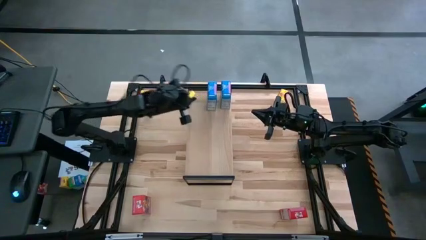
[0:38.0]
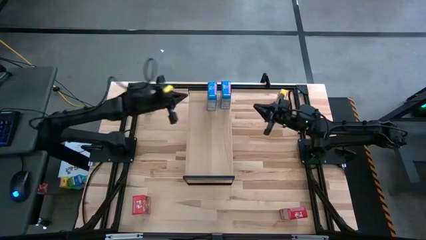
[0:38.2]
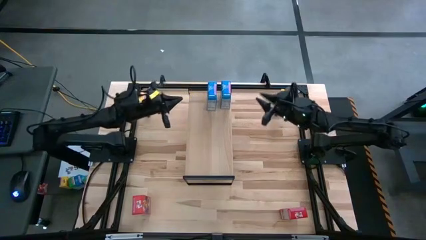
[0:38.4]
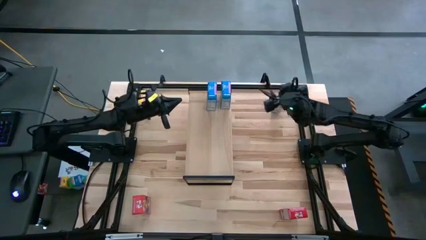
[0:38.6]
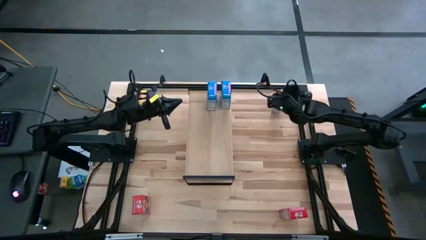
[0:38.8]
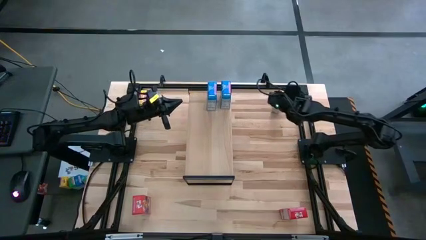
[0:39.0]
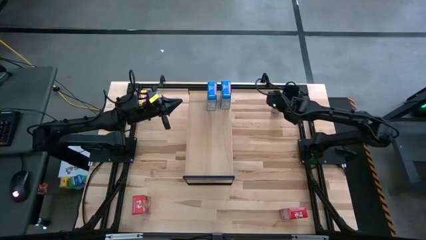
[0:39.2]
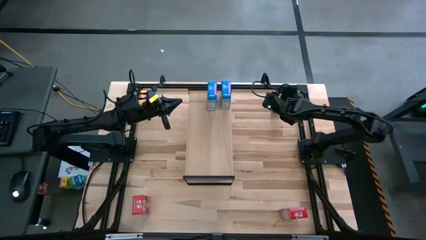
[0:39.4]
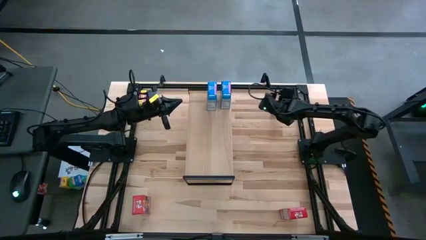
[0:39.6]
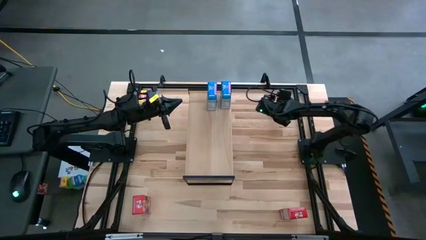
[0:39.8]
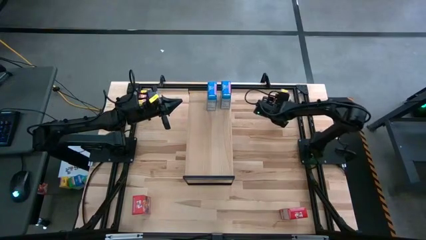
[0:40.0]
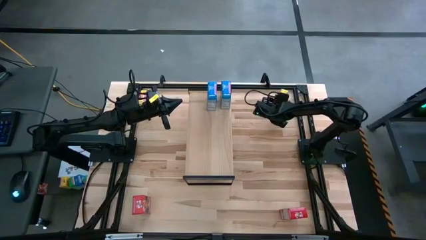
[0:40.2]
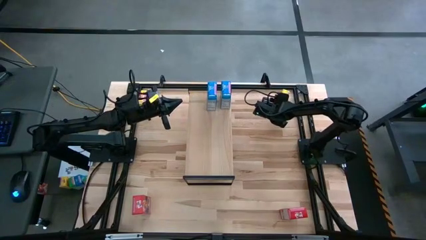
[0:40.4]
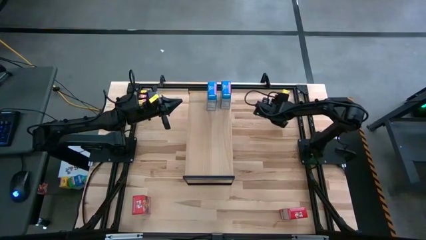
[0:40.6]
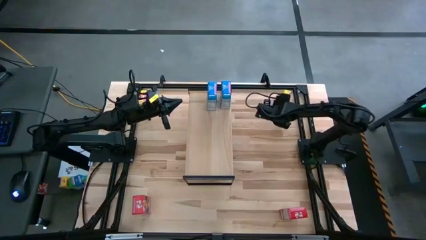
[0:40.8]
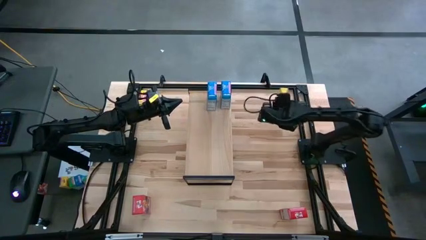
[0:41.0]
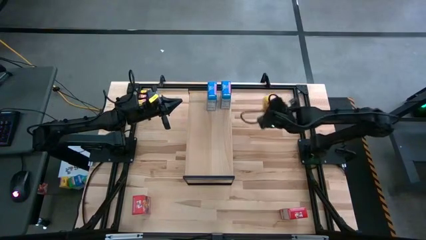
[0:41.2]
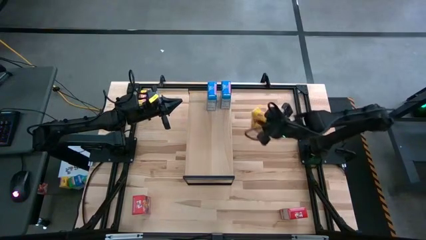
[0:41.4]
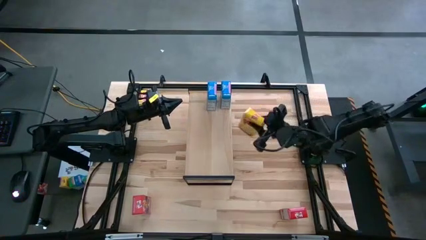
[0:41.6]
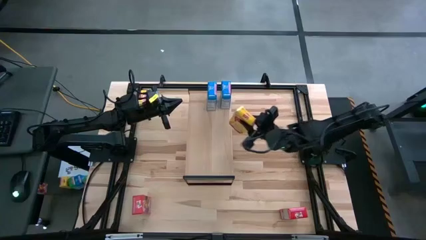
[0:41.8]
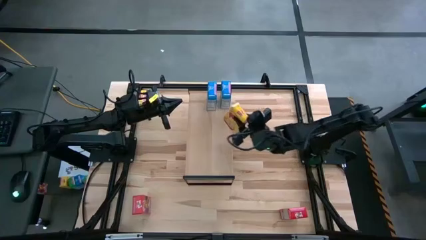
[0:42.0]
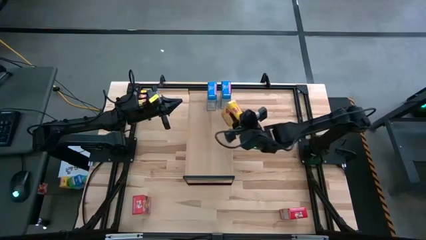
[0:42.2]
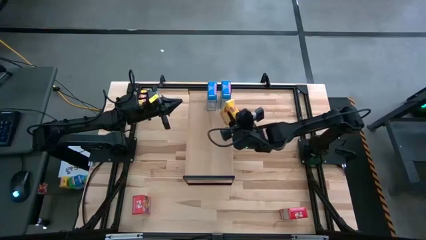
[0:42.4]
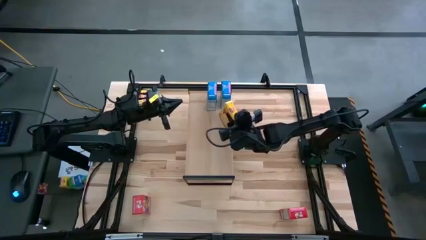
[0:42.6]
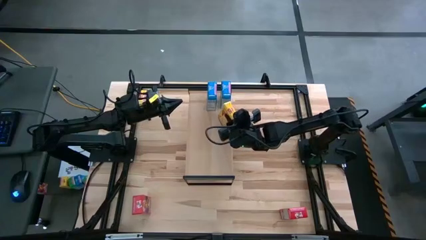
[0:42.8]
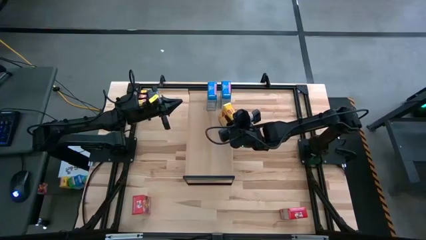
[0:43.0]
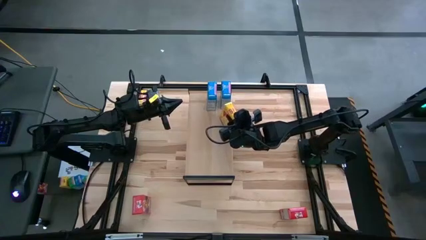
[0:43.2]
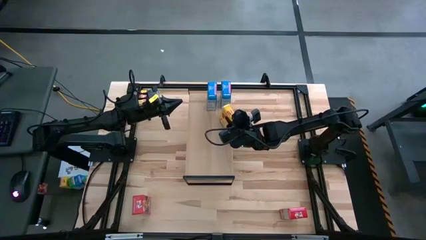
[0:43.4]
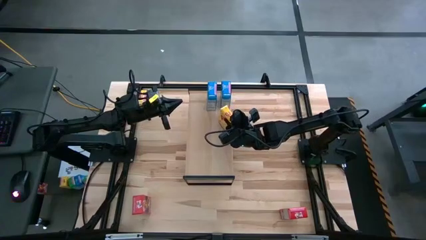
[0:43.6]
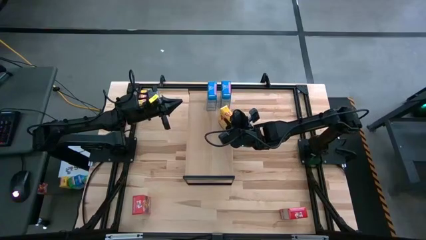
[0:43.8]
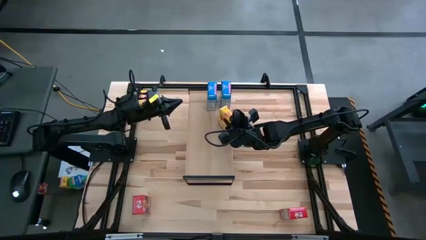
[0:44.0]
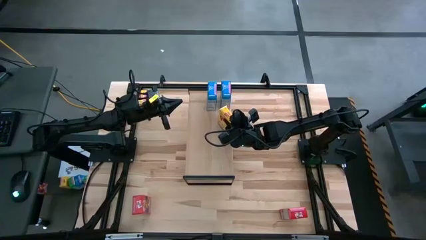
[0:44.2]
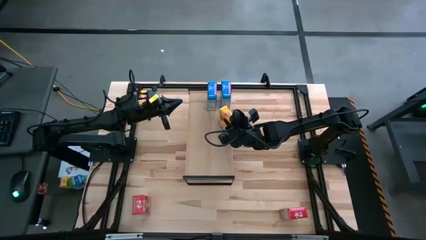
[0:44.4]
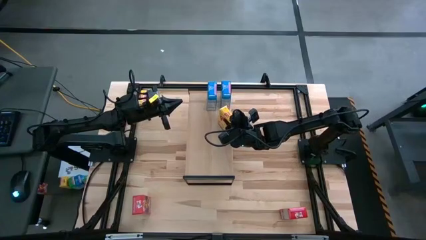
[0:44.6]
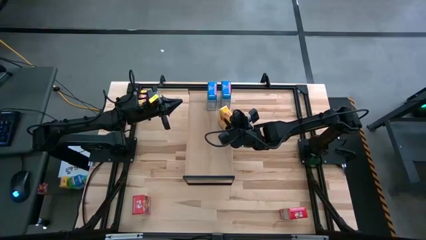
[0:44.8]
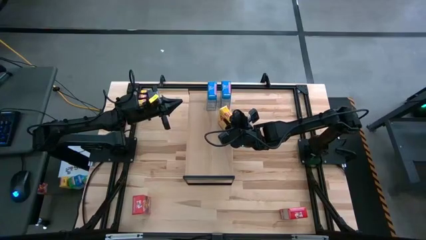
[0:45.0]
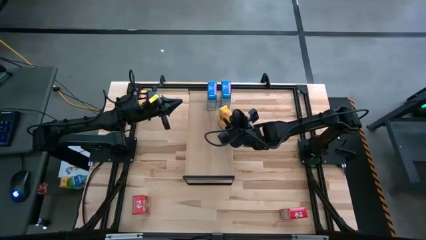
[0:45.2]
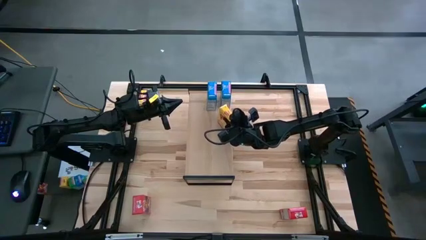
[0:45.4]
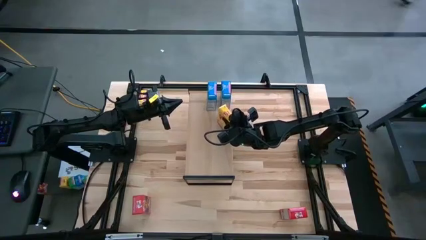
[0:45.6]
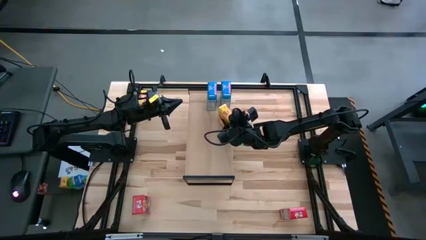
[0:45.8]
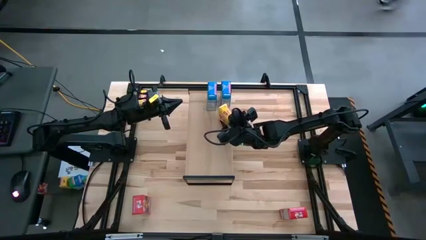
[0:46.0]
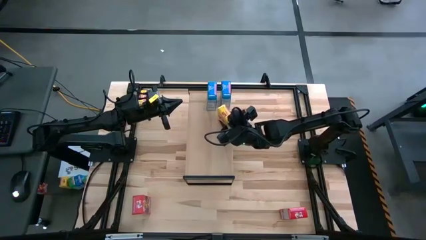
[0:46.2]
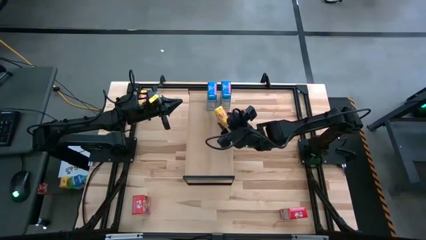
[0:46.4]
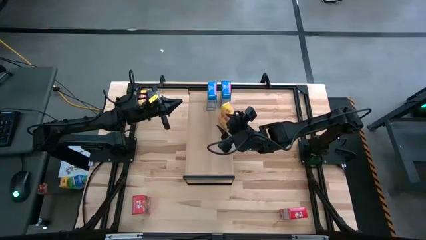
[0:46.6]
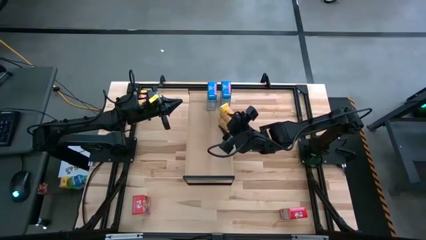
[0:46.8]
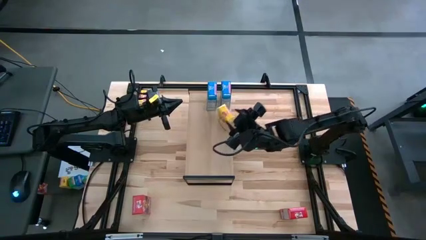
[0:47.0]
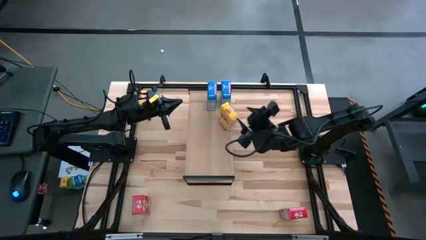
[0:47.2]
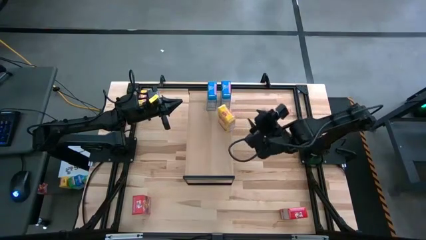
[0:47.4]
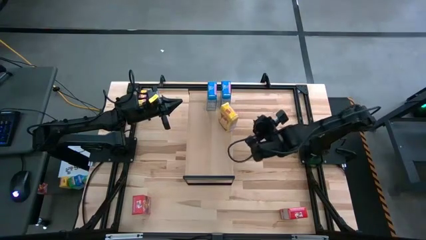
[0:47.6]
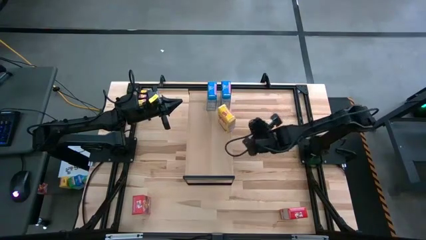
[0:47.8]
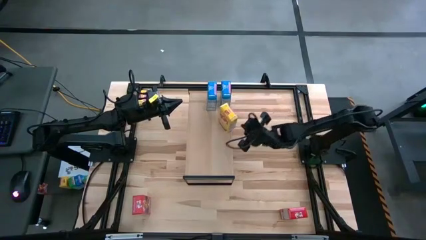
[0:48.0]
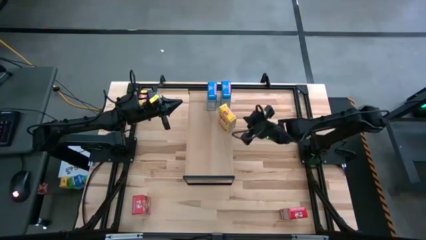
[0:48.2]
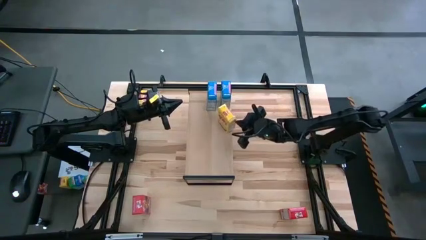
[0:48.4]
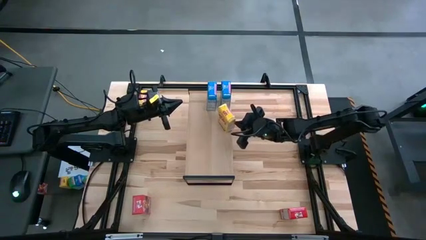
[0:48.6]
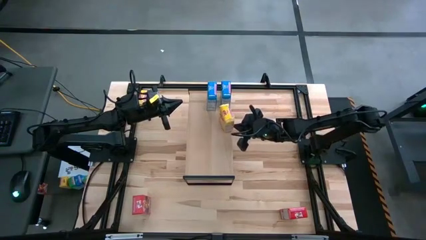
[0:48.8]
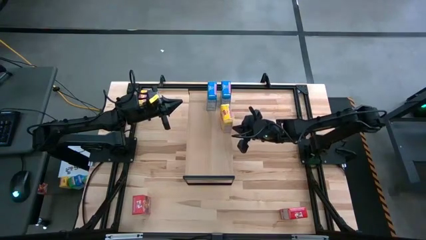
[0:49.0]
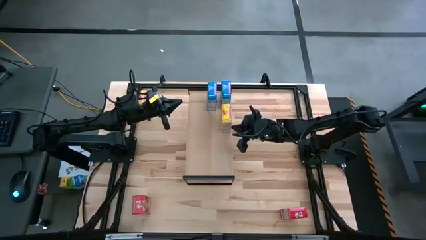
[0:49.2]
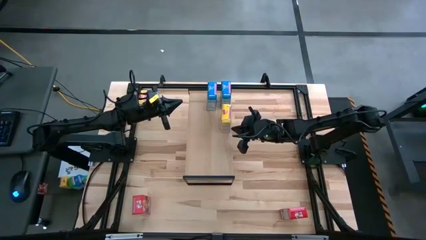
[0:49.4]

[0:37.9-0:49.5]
Task: Stack cereal on shelf
Put the right yellow cereal box on the shelf

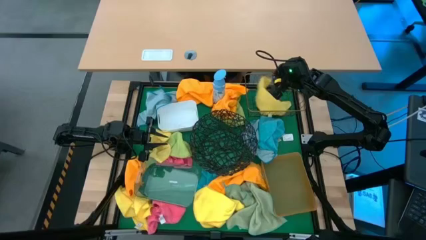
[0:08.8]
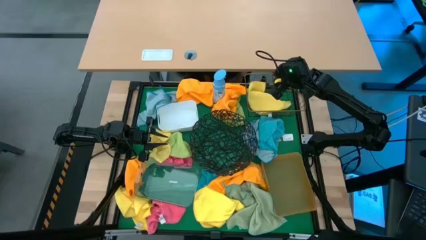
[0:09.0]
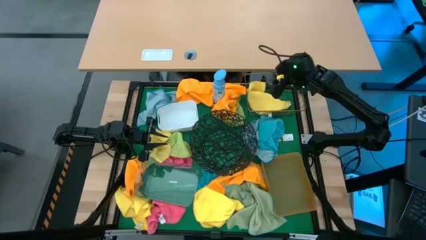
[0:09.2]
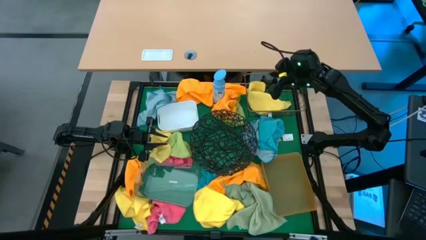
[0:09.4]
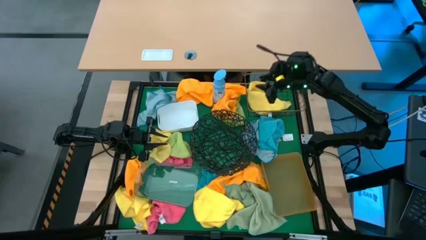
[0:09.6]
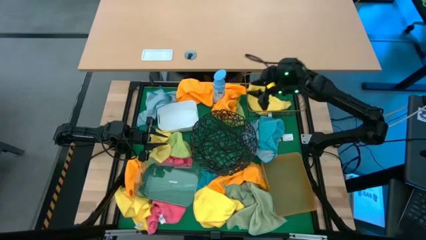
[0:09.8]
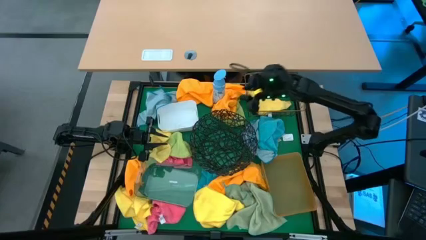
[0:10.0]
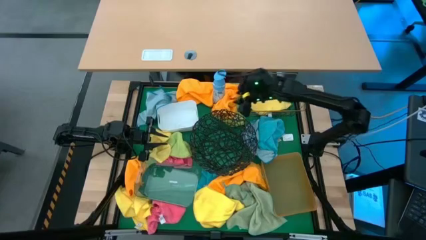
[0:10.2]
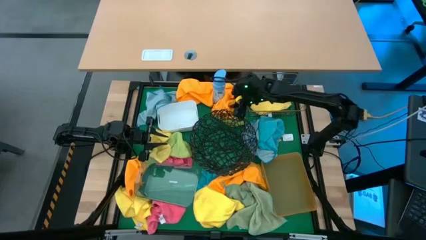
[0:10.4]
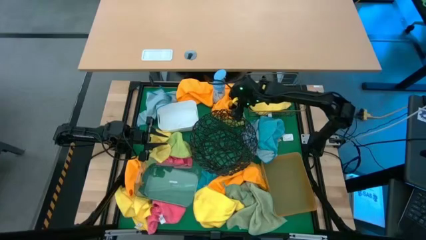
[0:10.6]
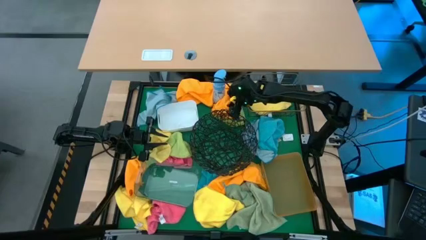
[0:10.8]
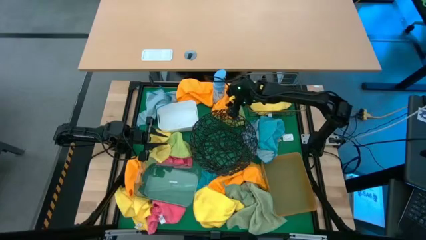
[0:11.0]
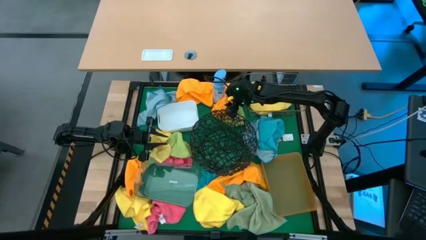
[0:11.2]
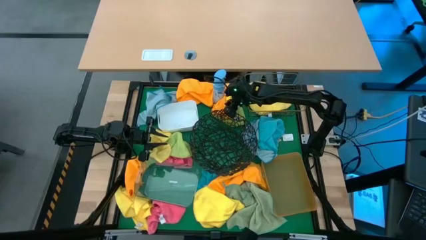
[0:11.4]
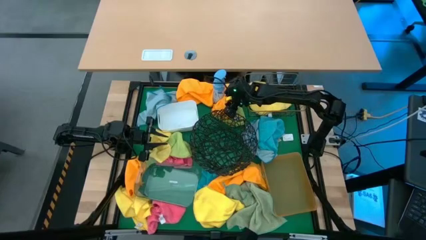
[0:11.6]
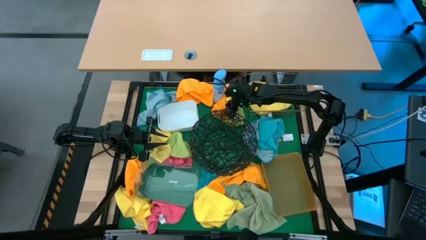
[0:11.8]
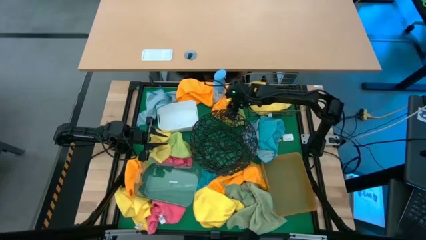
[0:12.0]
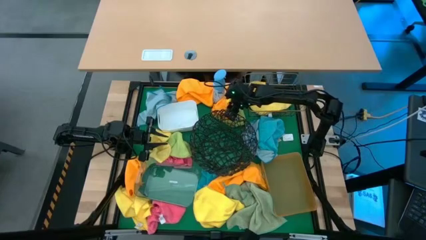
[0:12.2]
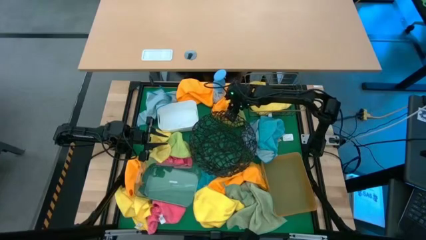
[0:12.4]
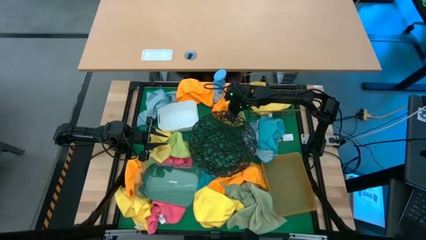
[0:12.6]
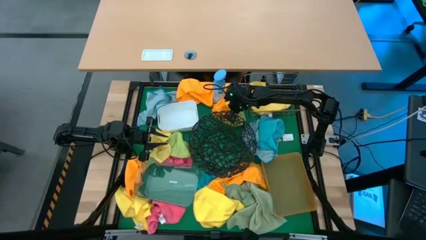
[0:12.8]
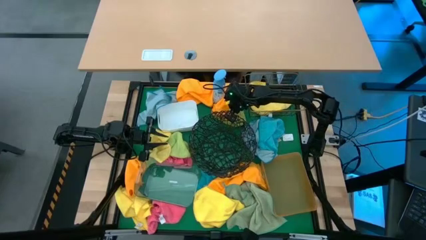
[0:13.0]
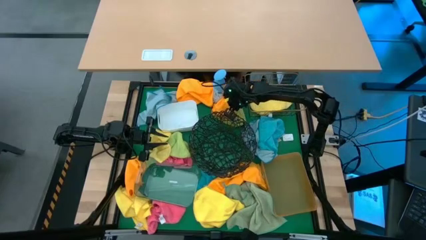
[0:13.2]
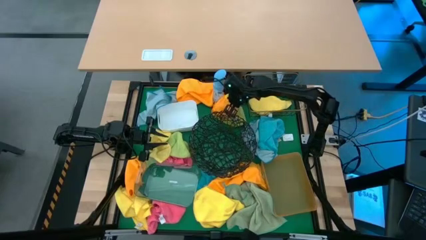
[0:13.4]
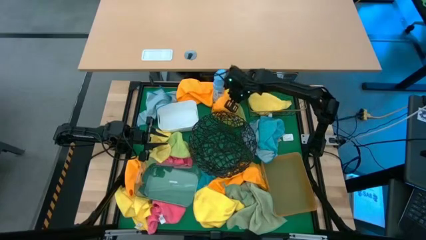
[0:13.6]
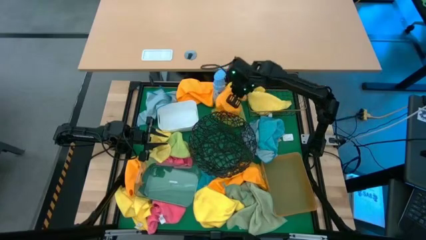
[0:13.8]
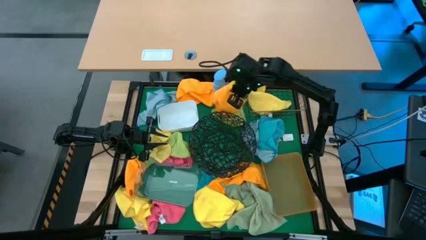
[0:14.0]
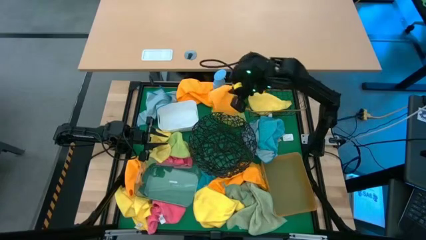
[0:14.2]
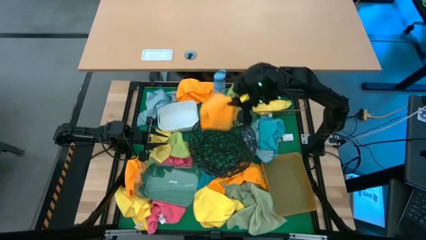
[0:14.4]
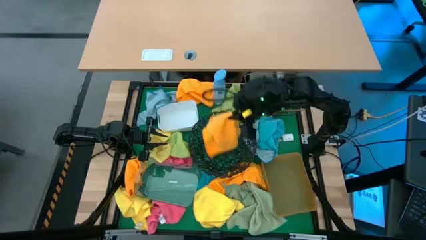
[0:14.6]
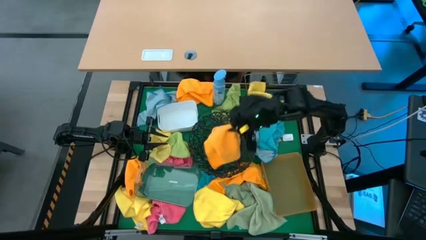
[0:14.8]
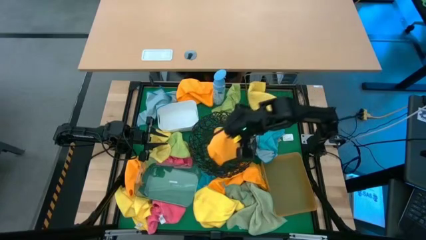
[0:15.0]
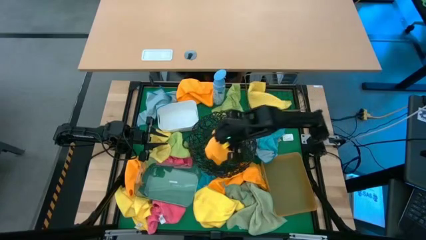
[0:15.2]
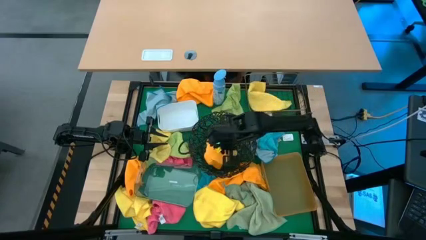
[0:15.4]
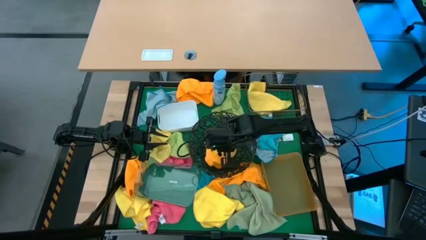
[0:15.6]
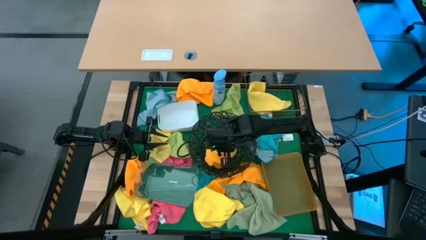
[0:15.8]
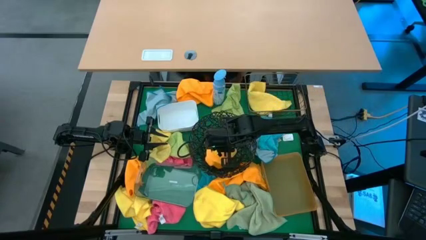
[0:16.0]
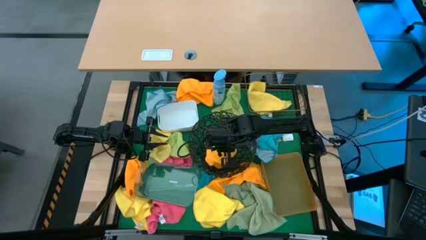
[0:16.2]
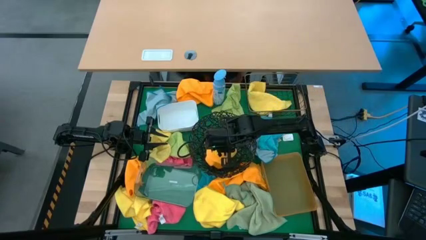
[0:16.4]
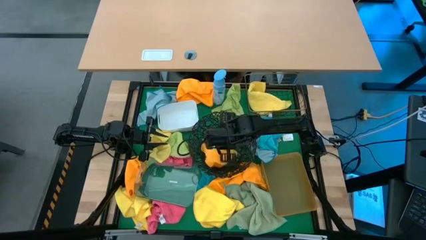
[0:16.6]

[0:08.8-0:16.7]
Task: Sort microfiber towel by color & place in baskets
Put the orange microfiber towel into the circle wire basket
